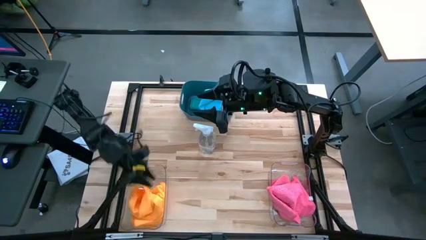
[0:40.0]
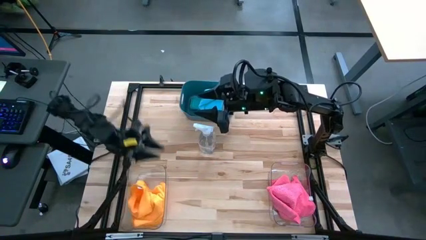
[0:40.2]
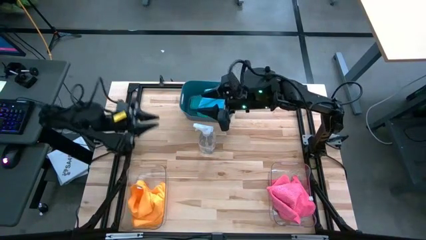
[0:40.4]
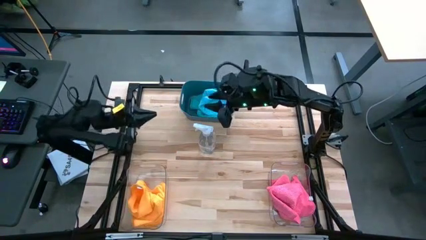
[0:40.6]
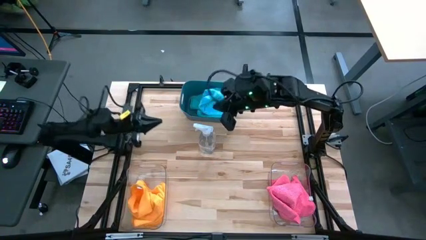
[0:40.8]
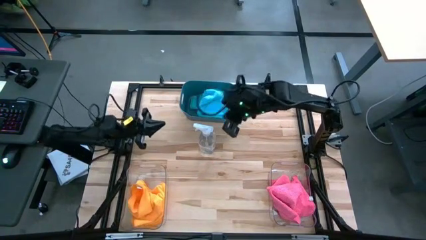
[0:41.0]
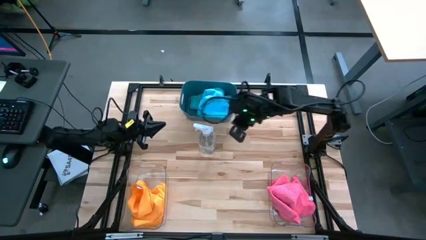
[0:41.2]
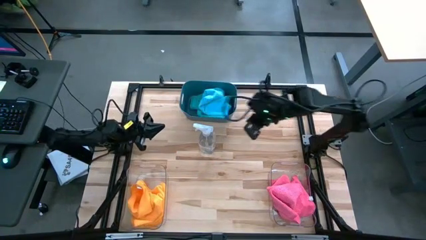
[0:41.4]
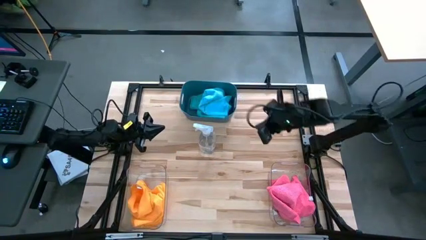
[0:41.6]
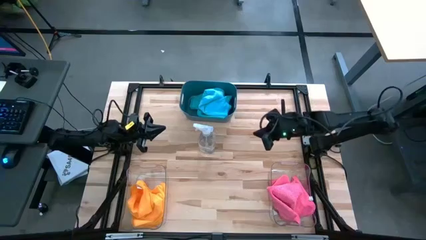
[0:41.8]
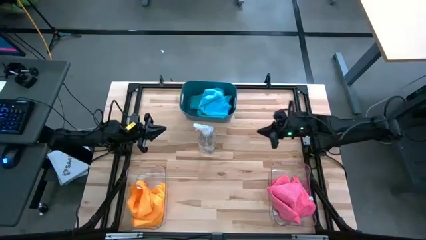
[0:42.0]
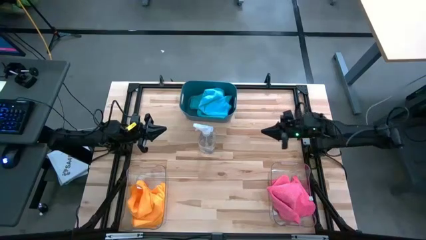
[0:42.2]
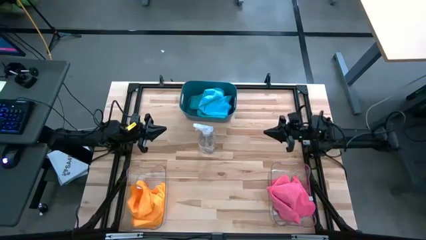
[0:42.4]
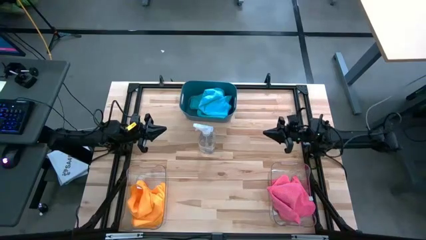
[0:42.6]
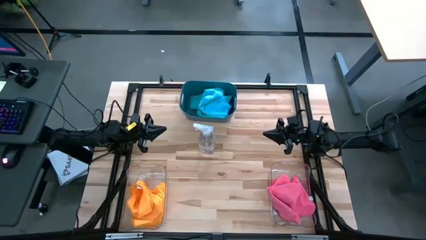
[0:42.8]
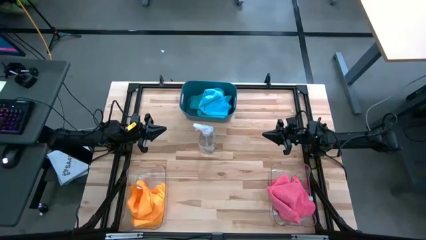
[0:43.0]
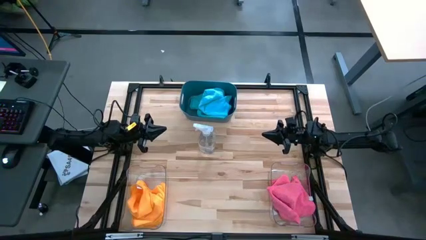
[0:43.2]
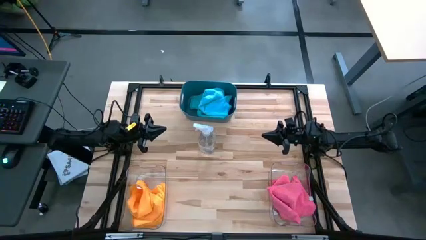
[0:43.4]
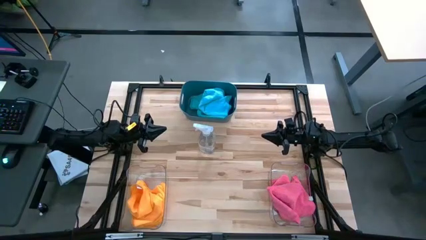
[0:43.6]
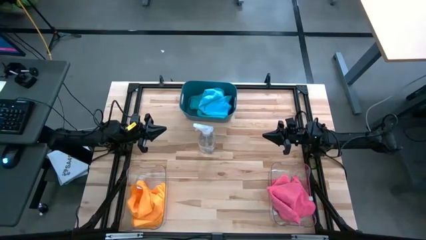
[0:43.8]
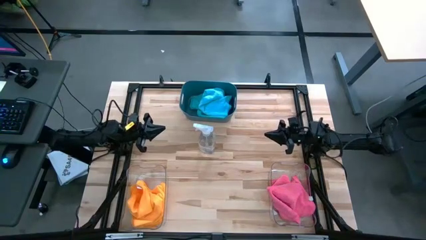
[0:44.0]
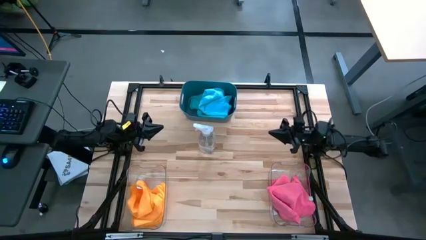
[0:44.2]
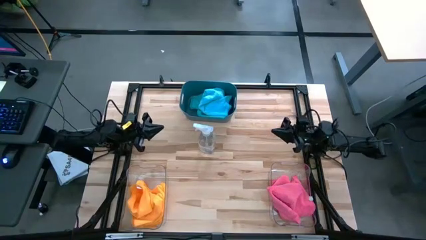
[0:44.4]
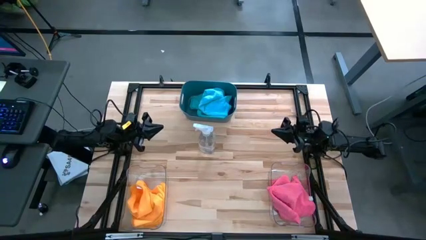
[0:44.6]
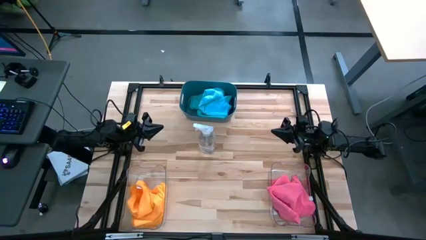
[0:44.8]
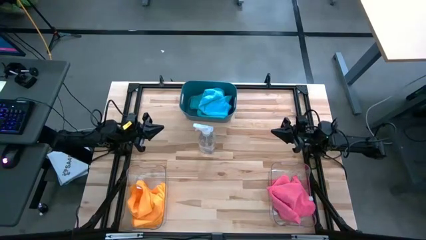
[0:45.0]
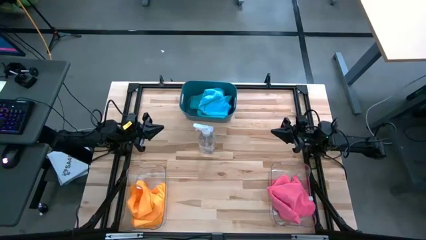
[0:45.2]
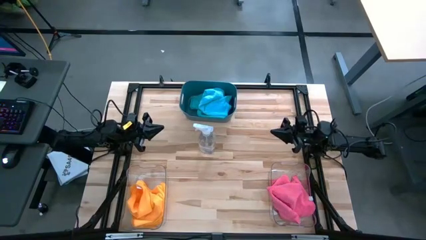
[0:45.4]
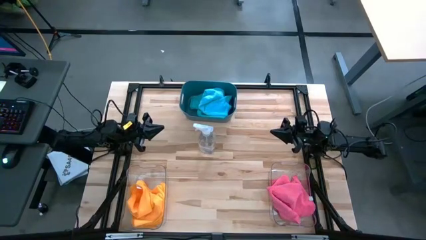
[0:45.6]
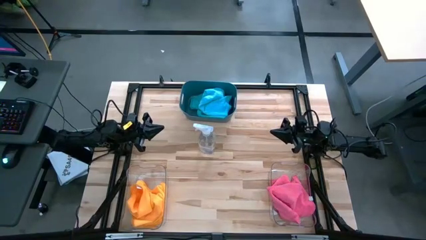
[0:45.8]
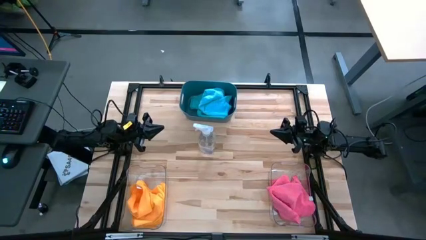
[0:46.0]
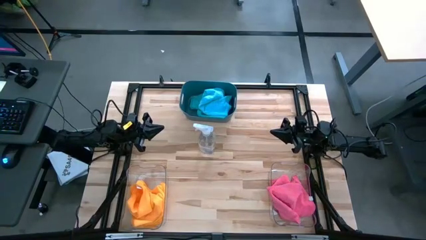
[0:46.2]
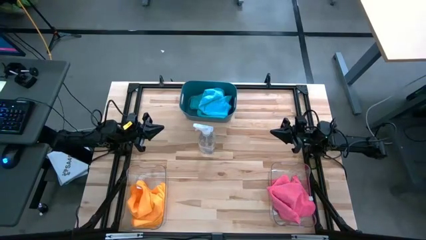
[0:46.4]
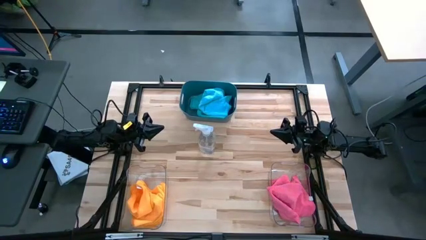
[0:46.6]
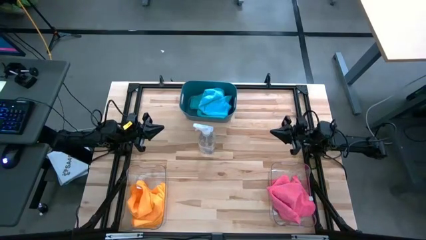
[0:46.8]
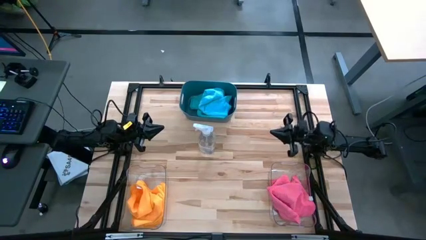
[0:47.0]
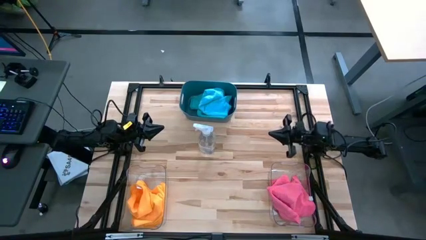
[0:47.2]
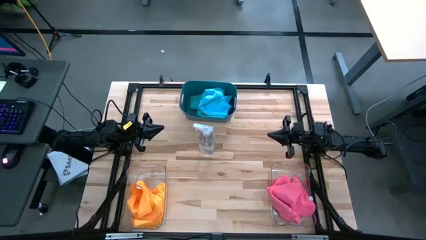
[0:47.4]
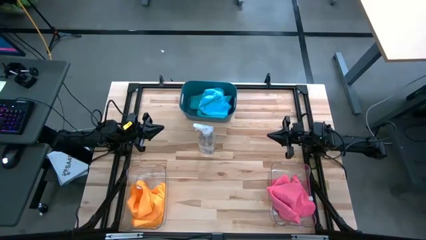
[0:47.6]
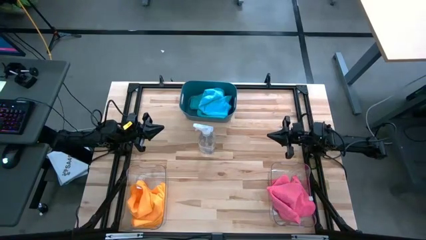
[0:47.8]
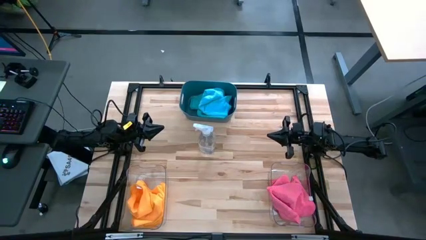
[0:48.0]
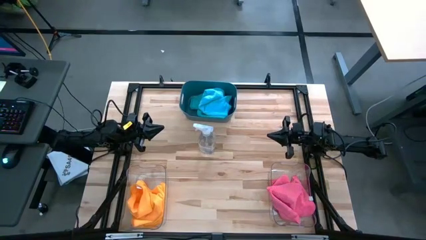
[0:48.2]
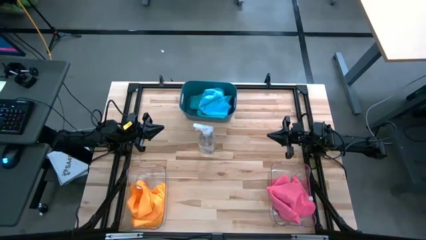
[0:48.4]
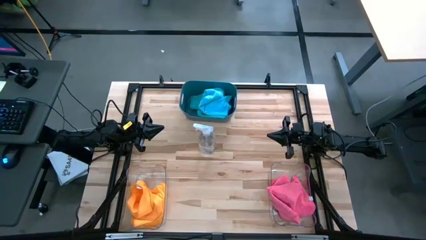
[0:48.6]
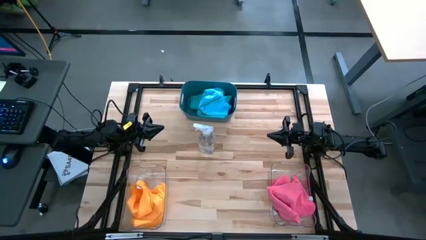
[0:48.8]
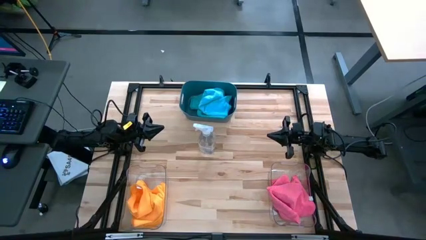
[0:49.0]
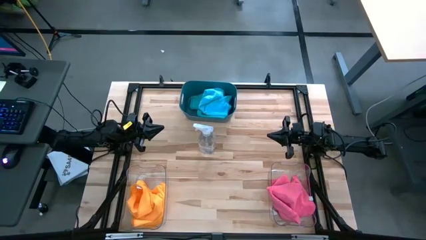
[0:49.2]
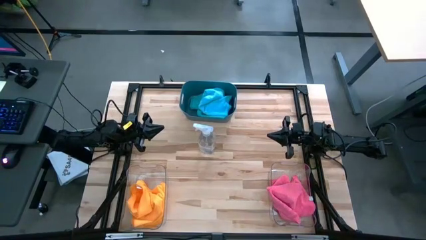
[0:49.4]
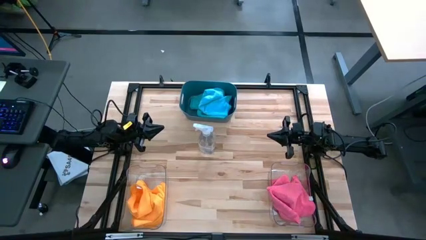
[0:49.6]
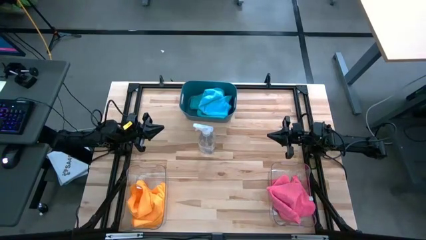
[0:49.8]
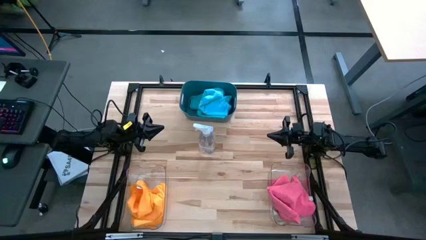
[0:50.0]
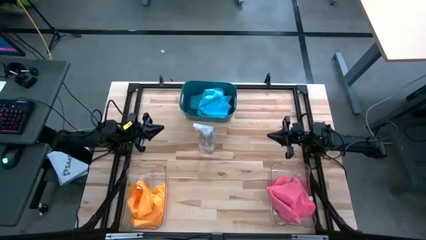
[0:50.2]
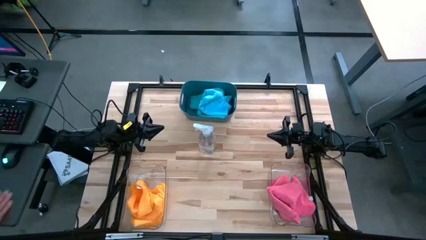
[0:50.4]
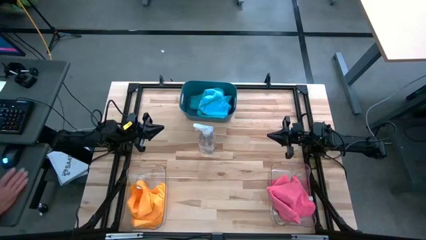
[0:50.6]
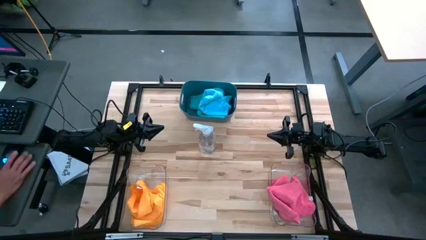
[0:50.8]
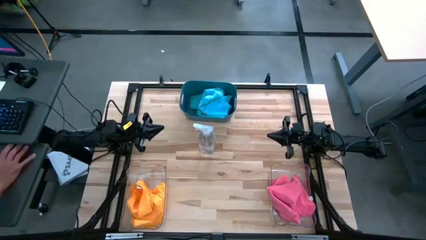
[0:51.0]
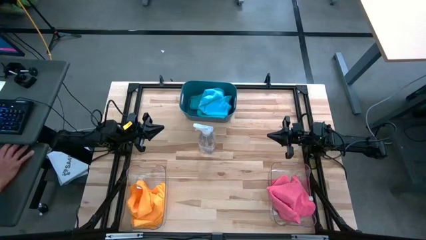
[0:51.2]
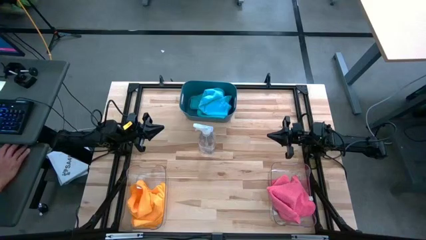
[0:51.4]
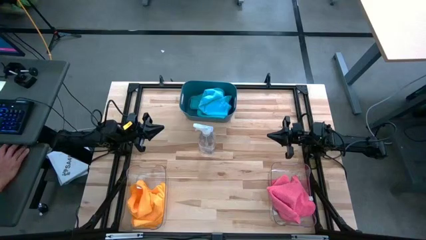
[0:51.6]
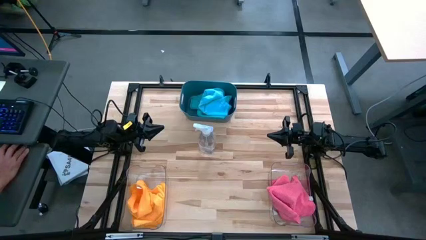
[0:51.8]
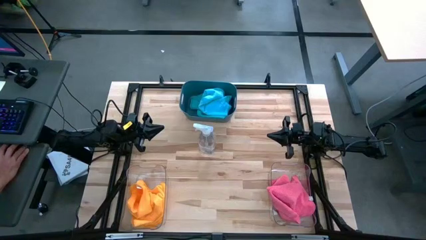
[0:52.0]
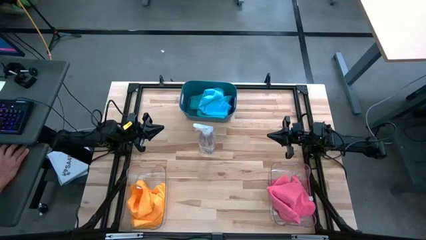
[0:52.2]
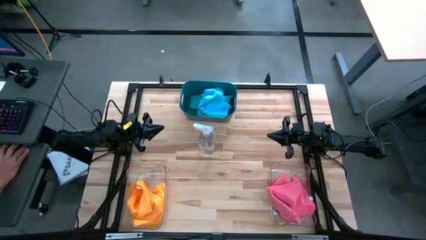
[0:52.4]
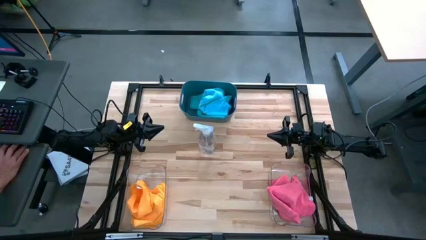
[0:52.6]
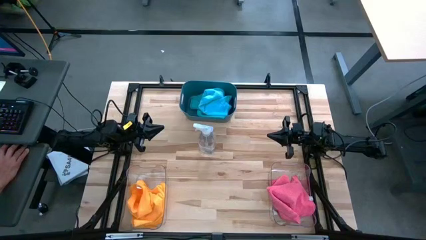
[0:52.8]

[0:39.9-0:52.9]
Task: Sort microfiber towel by color & place in baskets
Return to Home Position

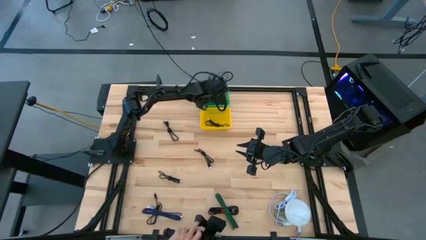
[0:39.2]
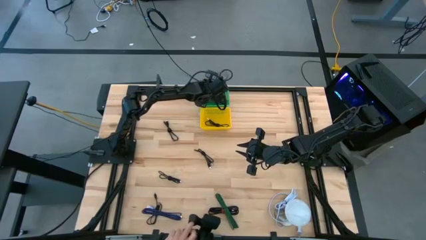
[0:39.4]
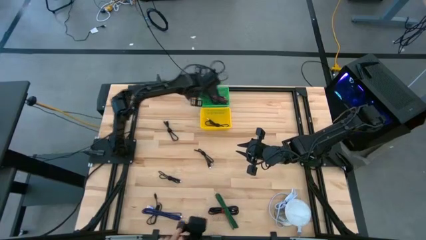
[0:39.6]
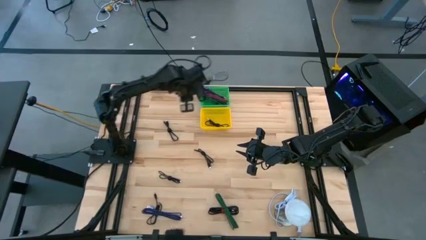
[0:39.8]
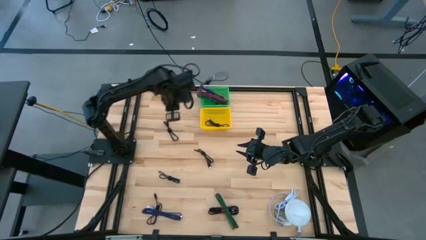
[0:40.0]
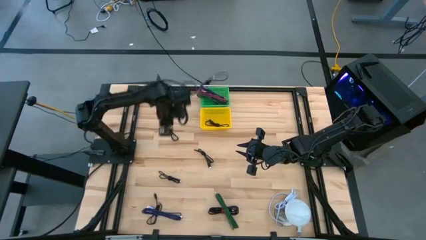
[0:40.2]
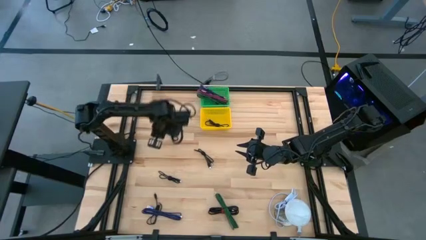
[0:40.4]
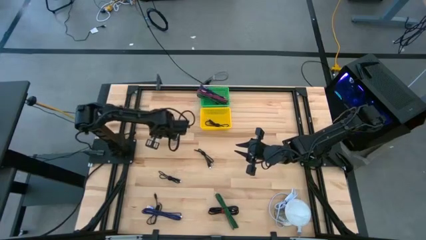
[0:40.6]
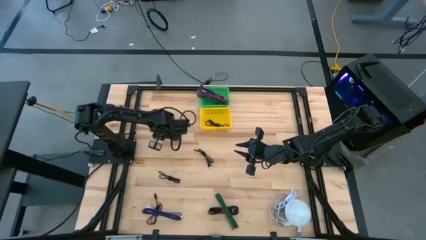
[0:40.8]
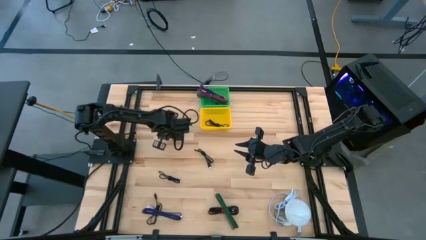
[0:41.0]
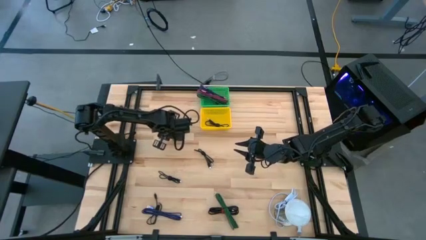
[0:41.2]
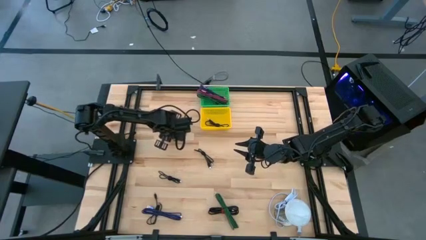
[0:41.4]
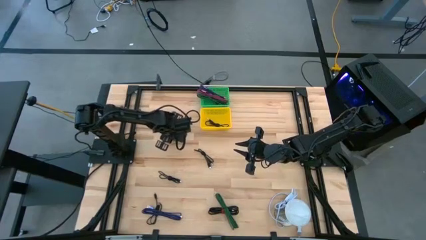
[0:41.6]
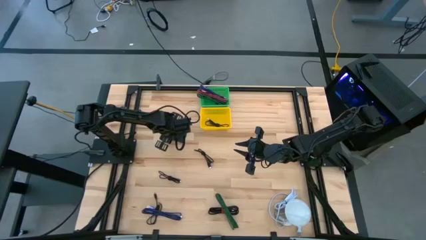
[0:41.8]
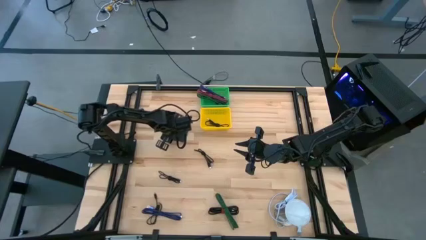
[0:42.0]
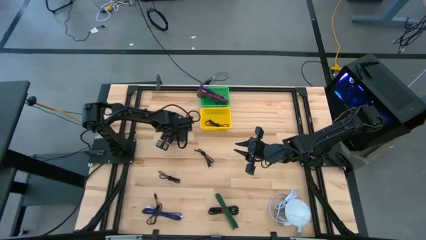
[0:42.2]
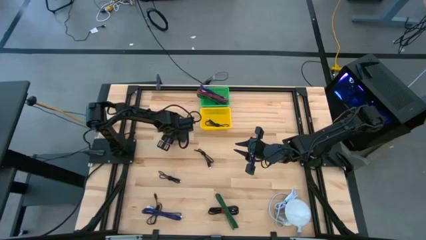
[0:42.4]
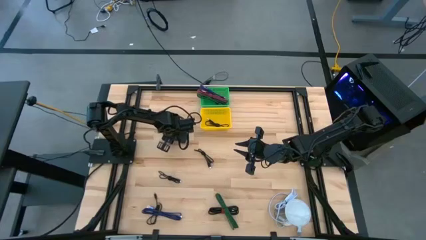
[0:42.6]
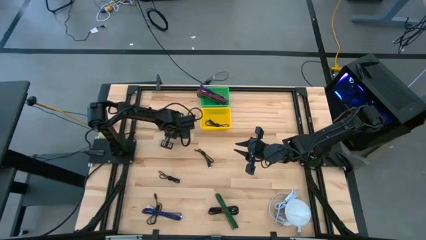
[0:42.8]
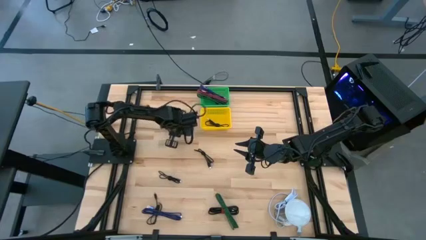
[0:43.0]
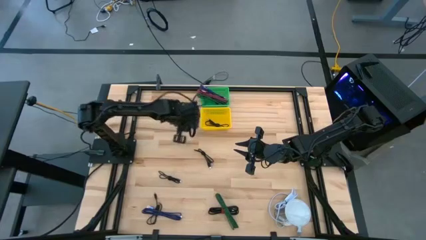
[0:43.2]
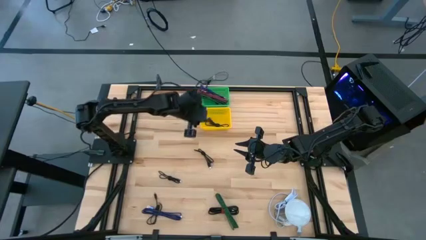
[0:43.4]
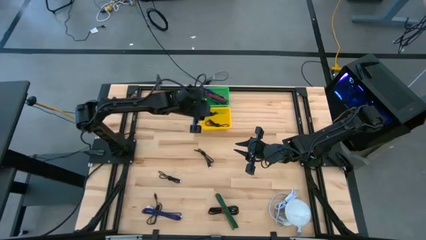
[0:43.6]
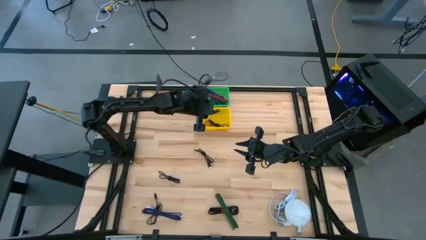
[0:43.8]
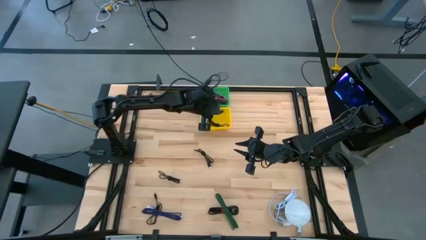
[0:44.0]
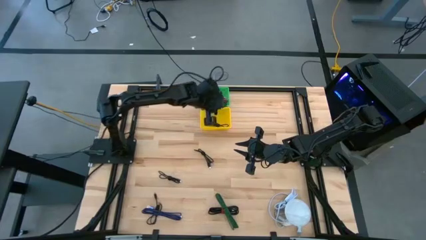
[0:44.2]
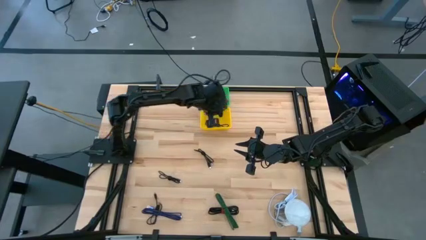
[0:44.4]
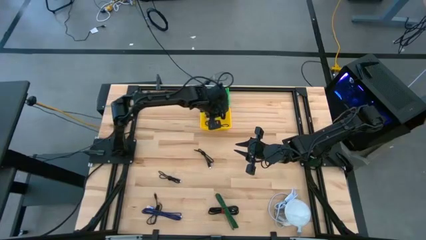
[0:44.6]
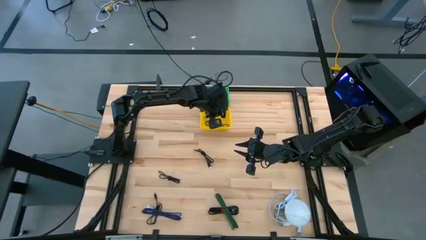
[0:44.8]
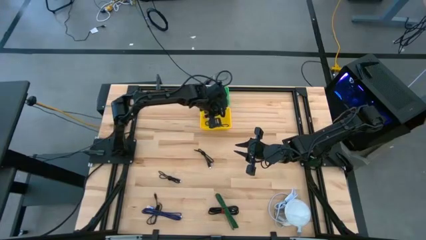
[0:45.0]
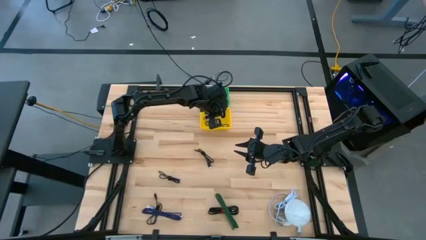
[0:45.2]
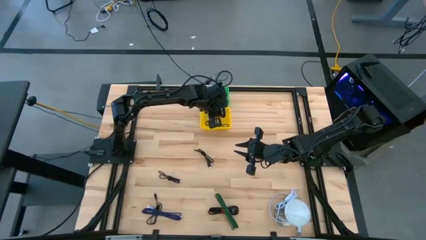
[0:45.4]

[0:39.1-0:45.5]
Task: Pick & Place USB Port
Put the top-left black charger cable into the yellow basket
